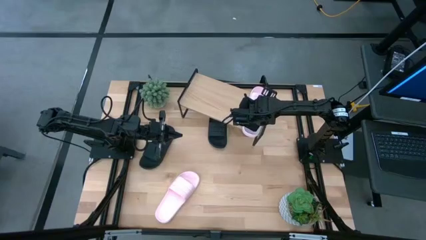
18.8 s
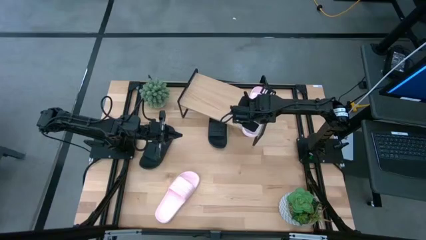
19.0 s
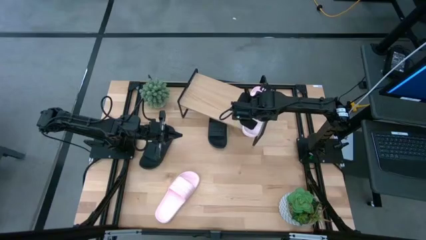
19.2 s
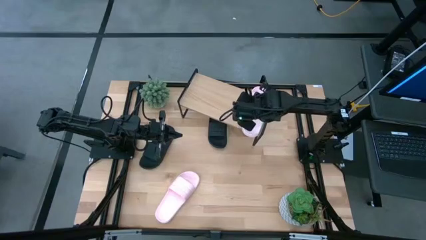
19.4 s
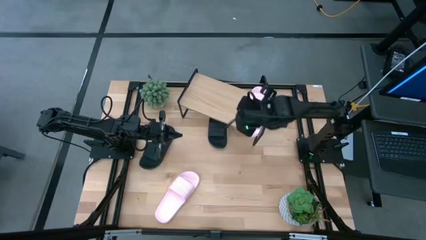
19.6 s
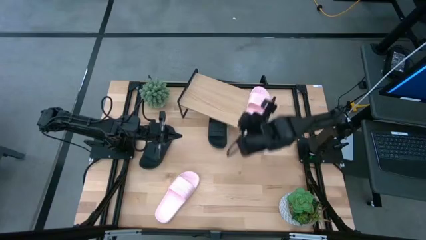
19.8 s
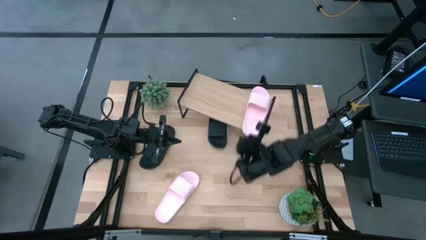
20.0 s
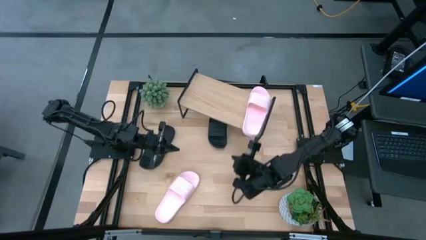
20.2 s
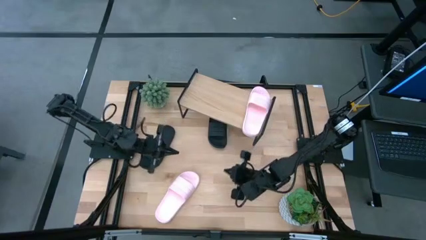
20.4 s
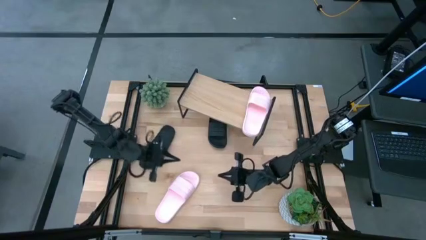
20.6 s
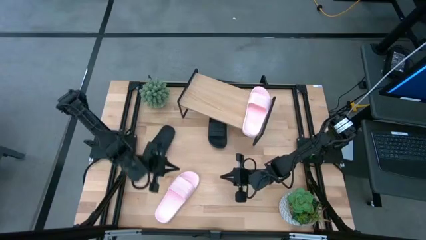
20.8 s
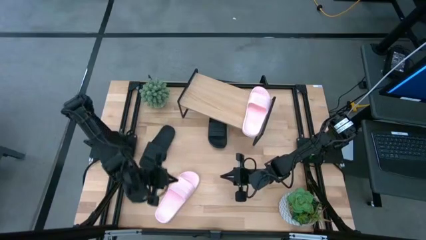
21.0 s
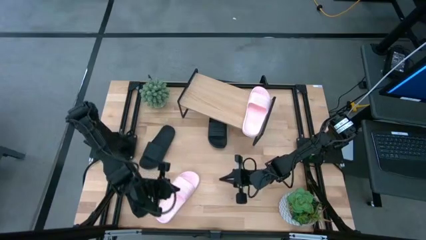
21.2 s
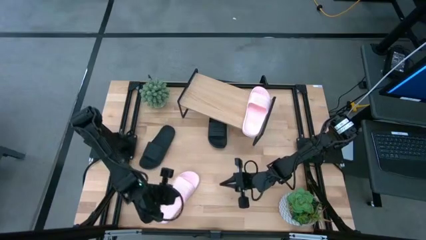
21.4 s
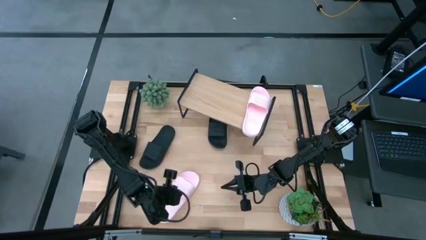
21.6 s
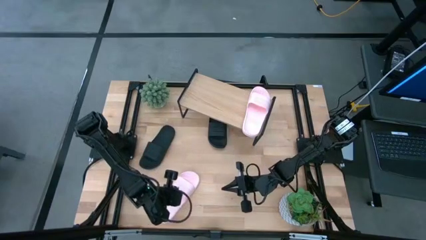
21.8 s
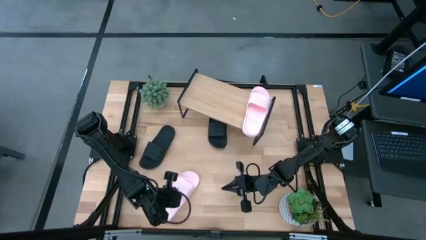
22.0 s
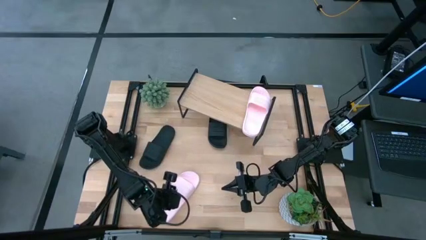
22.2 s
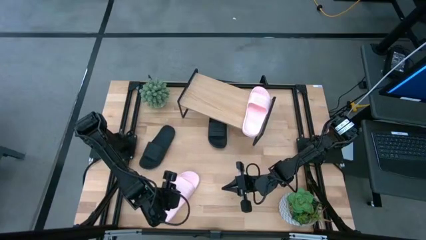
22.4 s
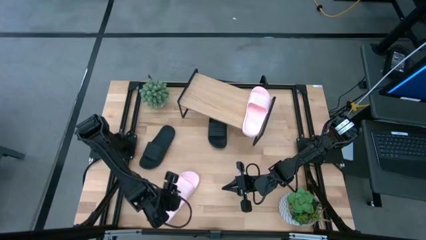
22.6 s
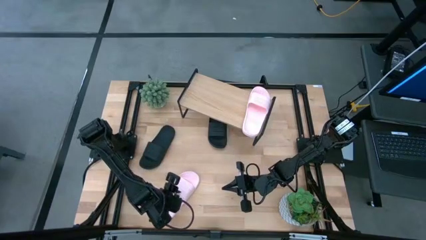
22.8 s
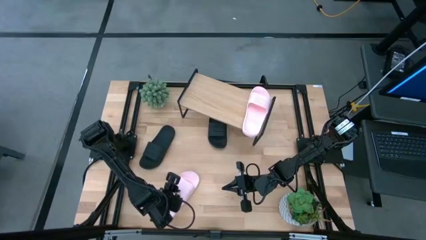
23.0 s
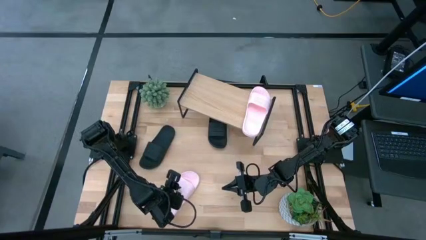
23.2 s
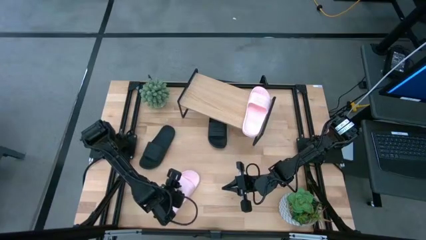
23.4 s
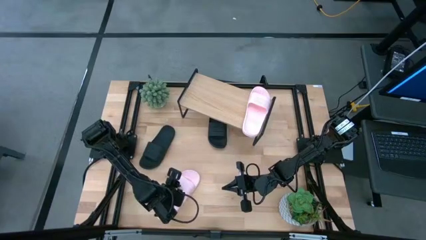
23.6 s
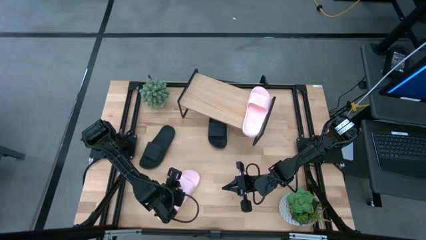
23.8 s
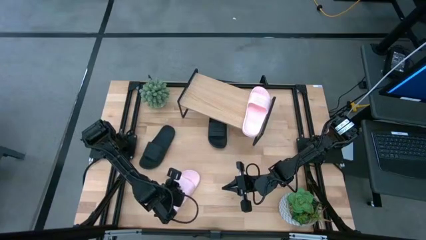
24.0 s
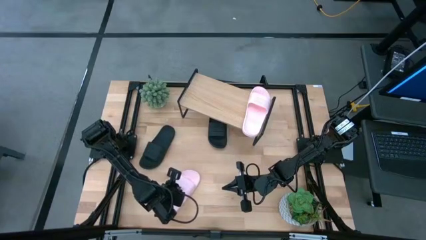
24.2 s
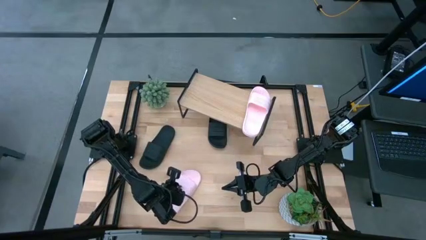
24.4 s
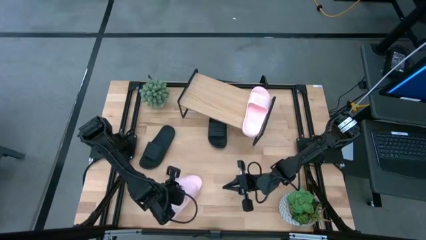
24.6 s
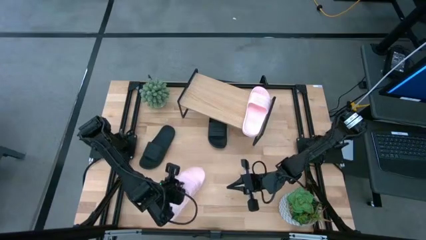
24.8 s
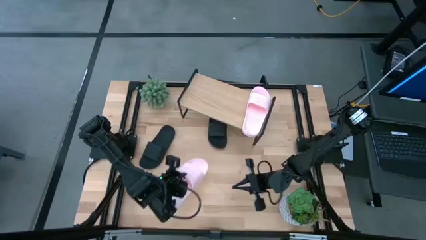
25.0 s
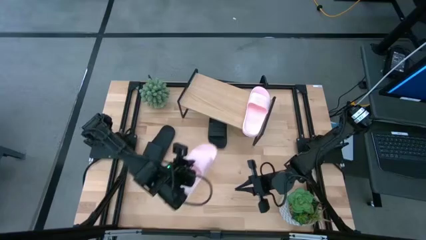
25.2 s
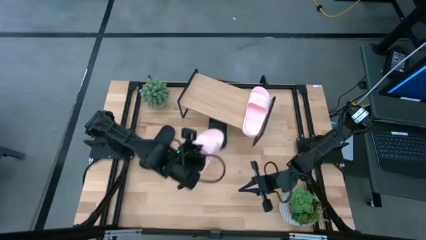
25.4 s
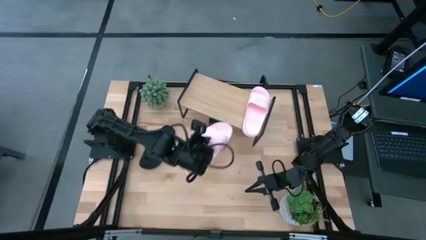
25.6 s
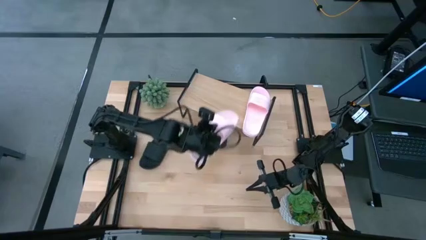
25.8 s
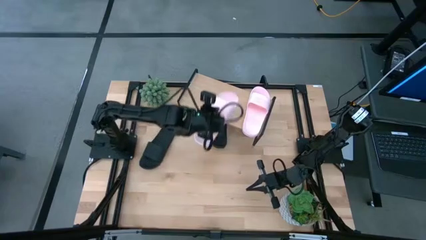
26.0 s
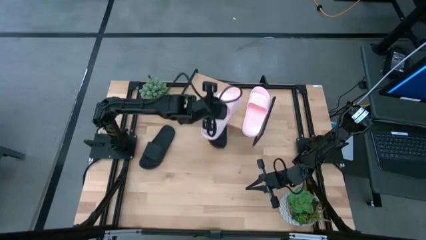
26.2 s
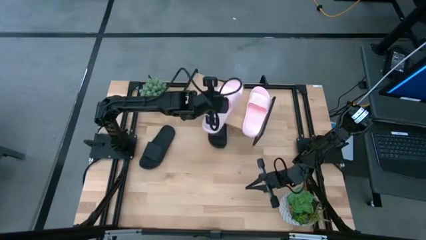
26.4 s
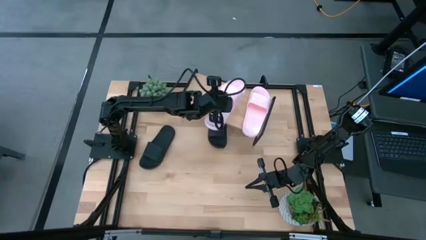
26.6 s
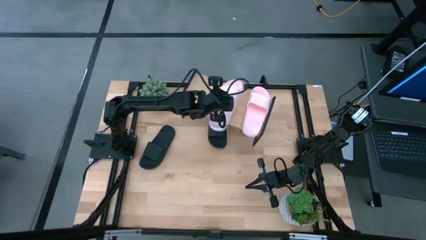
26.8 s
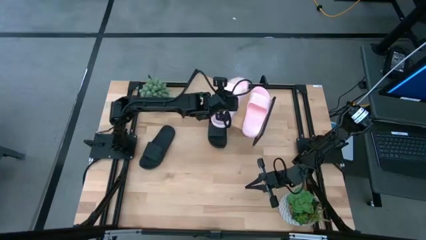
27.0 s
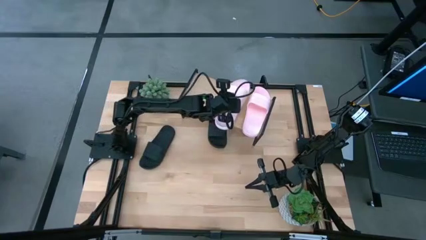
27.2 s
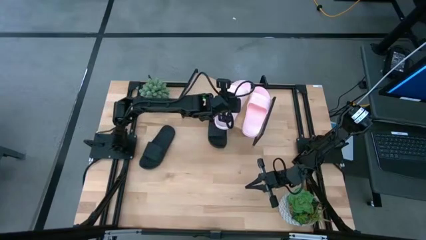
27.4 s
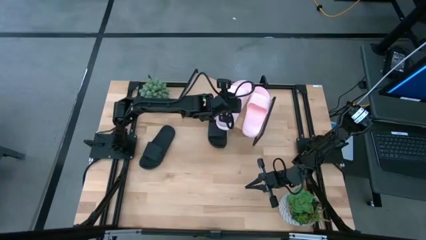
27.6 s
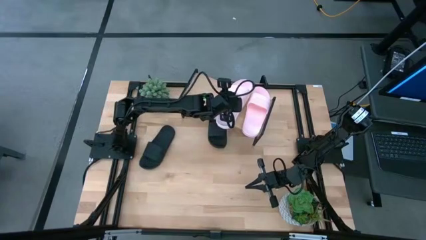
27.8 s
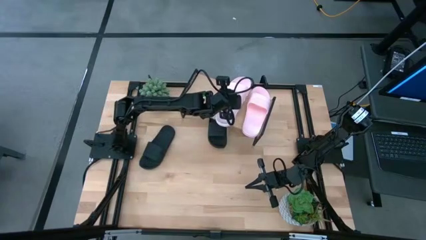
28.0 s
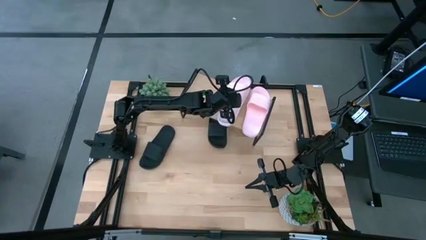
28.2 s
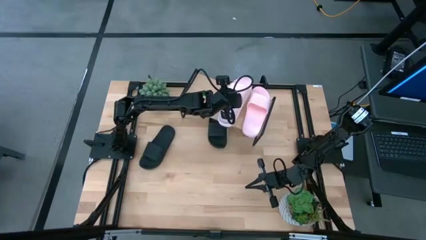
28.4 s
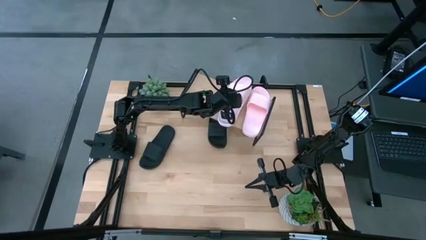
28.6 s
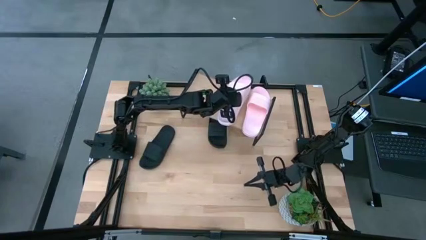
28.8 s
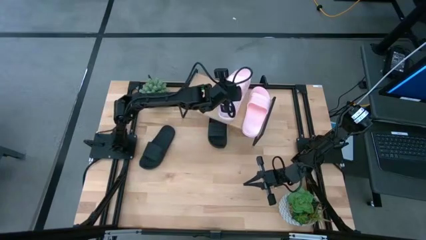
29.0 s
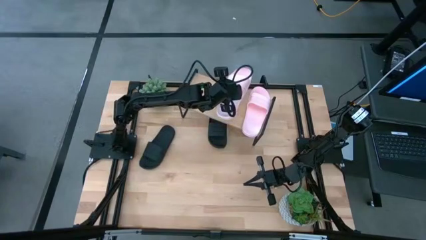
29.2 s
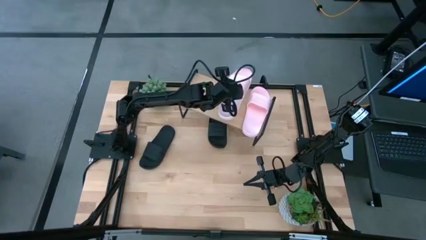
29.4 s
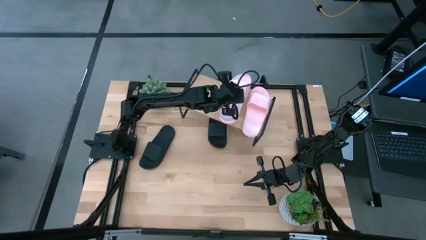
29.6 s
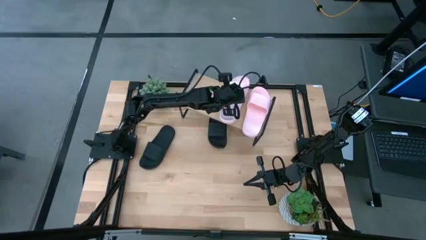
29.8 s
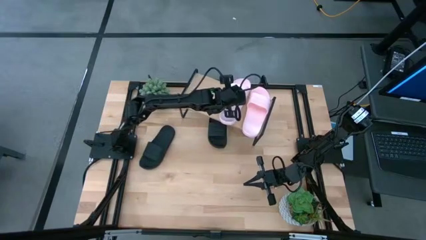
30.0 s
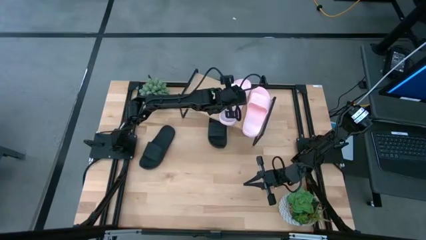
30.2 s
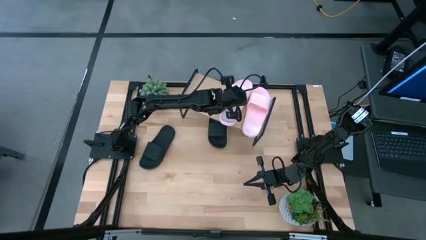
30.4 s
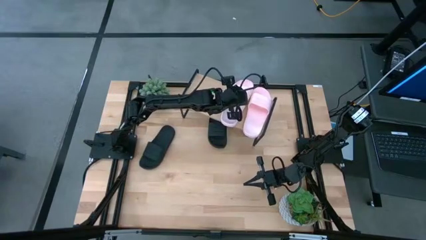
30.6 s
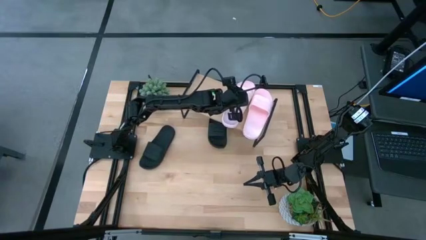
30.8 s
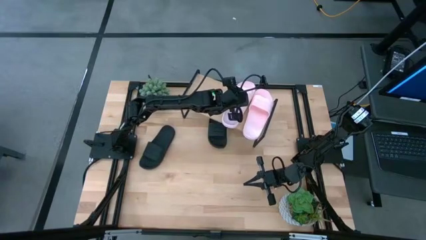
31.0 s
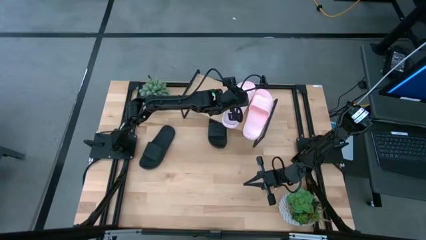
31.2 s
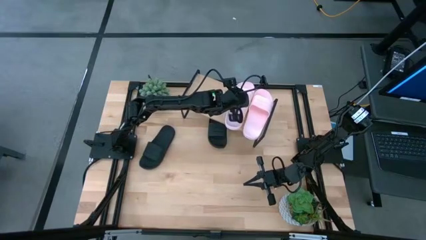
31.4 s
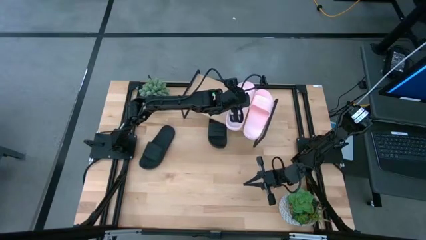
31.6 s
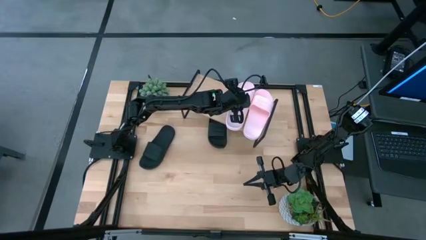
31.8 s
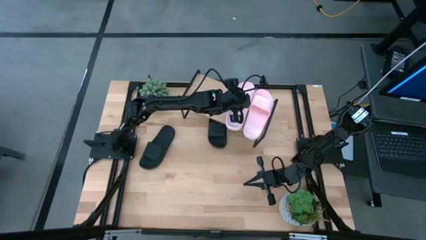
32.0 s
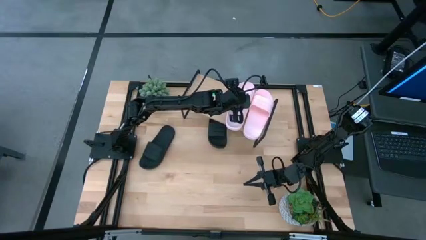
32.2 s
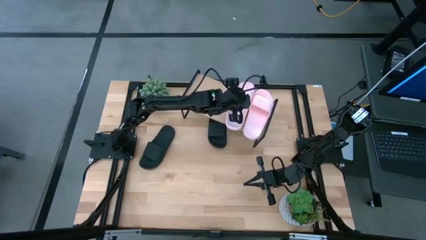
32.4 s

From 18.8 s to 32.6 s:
Task: Pick and place slides into the shelf
Put the white slides on the shelf
